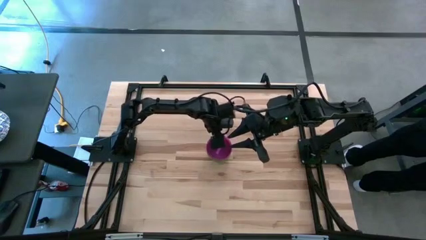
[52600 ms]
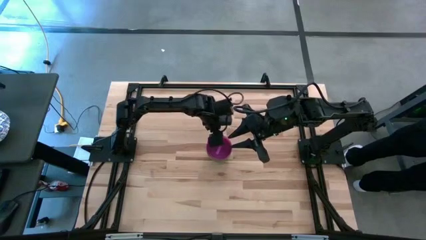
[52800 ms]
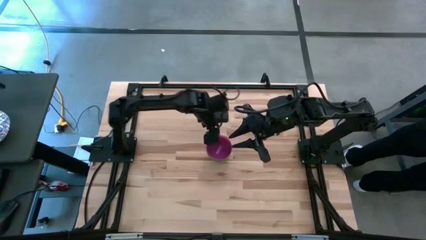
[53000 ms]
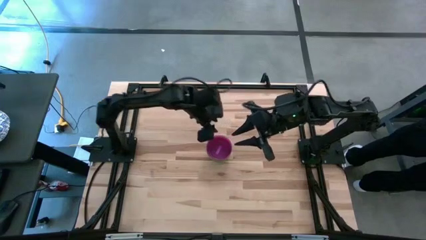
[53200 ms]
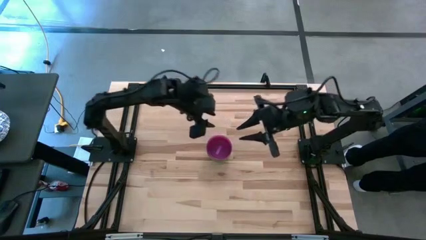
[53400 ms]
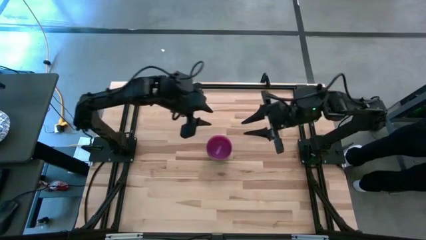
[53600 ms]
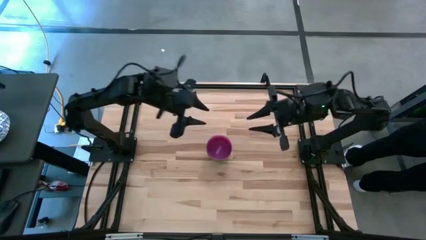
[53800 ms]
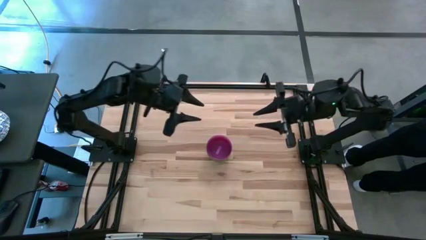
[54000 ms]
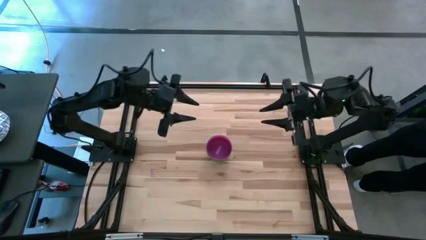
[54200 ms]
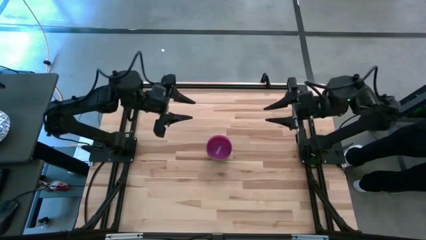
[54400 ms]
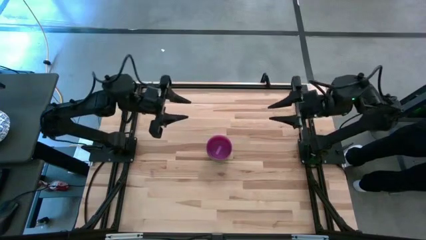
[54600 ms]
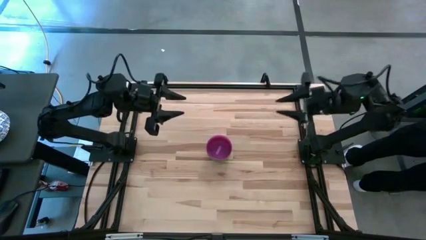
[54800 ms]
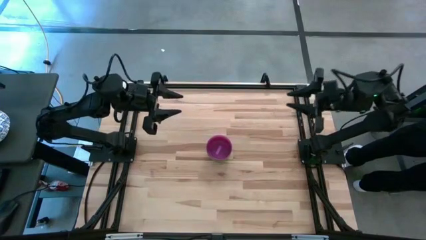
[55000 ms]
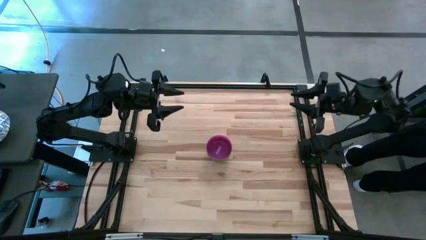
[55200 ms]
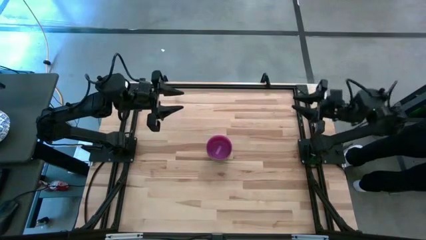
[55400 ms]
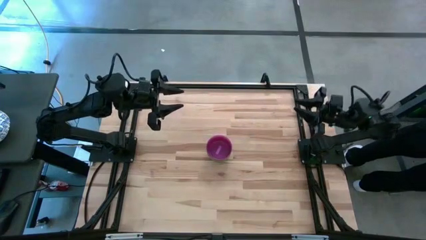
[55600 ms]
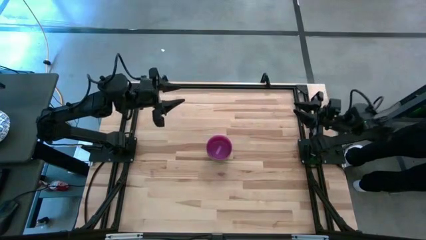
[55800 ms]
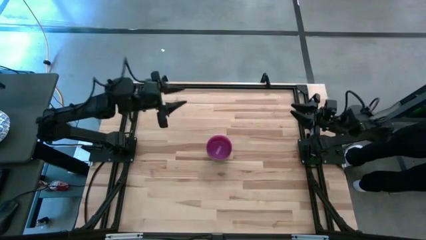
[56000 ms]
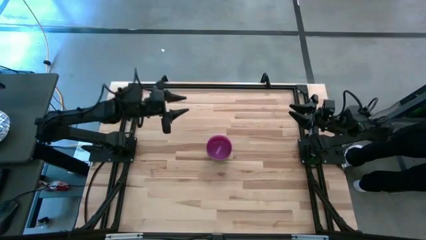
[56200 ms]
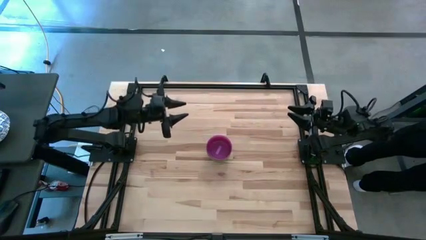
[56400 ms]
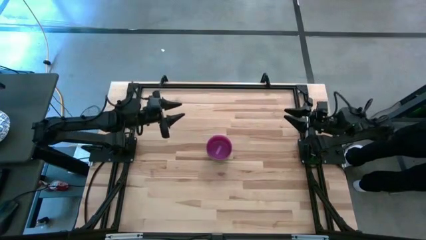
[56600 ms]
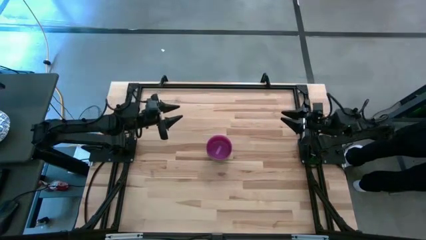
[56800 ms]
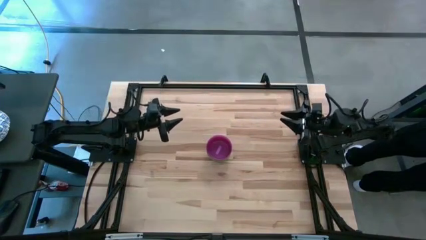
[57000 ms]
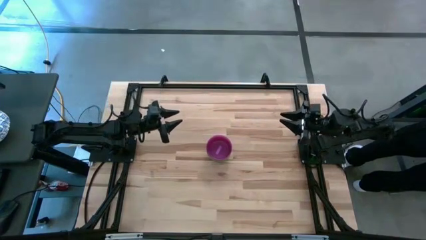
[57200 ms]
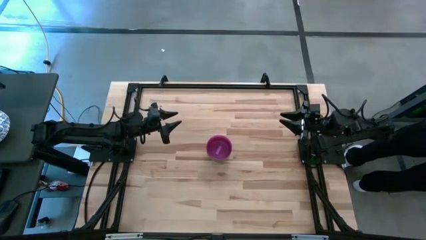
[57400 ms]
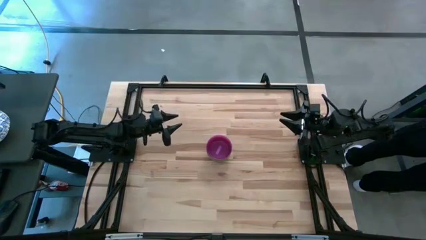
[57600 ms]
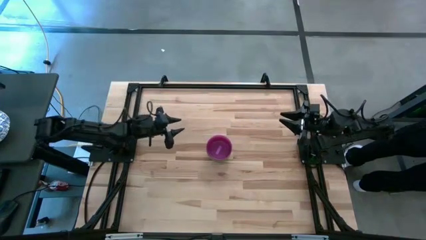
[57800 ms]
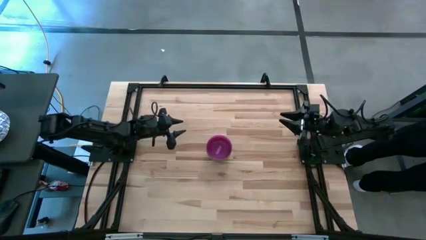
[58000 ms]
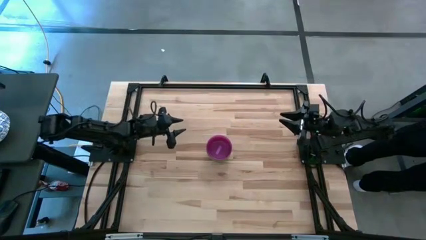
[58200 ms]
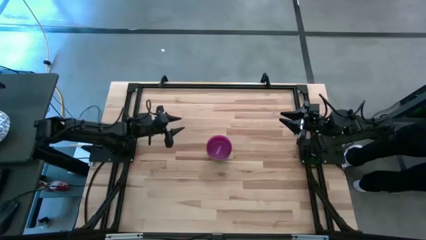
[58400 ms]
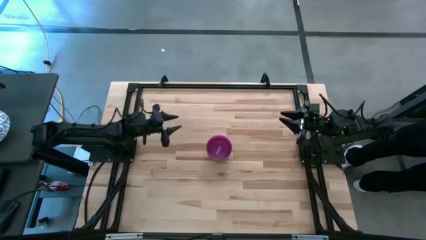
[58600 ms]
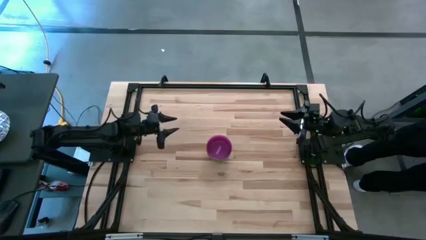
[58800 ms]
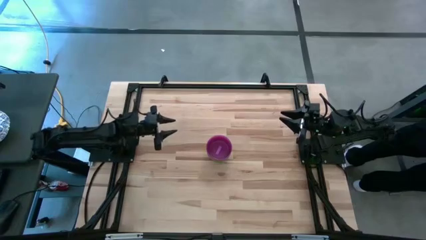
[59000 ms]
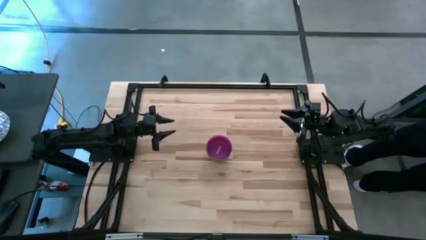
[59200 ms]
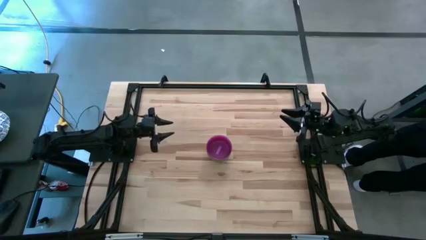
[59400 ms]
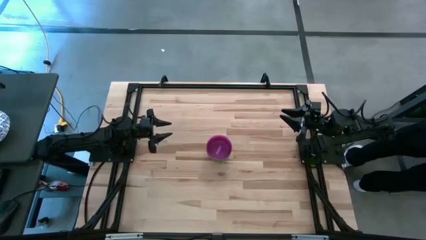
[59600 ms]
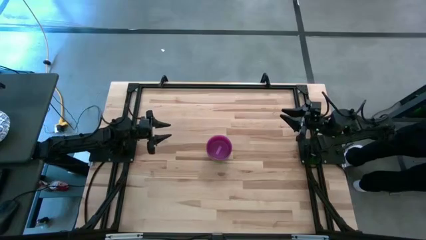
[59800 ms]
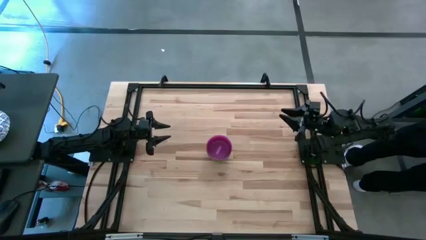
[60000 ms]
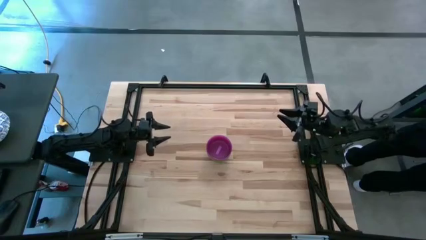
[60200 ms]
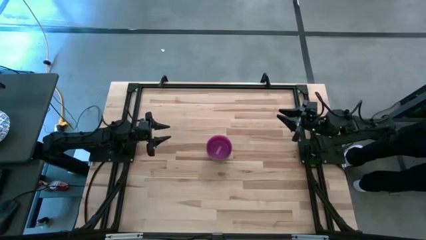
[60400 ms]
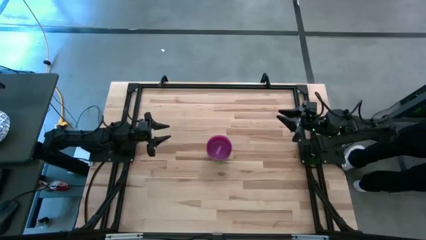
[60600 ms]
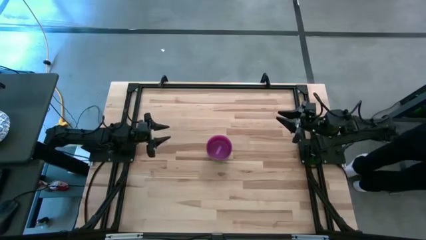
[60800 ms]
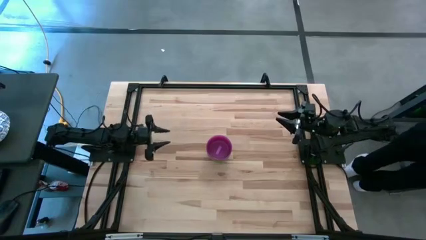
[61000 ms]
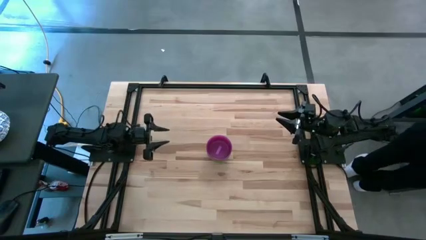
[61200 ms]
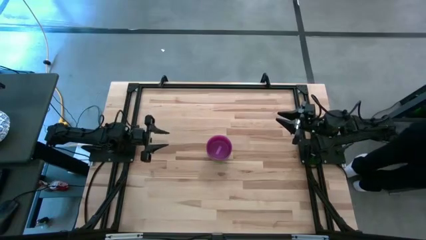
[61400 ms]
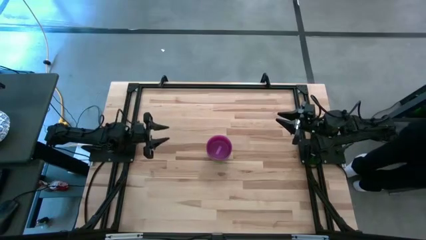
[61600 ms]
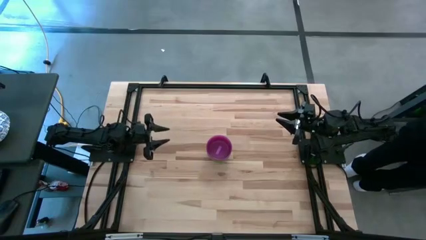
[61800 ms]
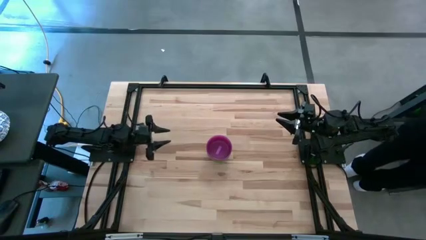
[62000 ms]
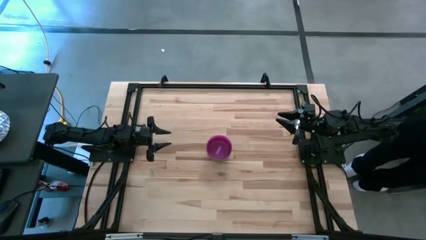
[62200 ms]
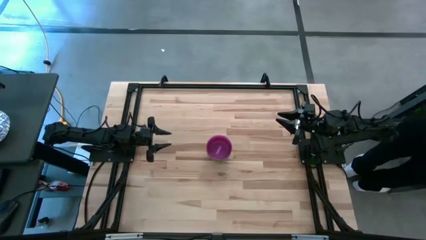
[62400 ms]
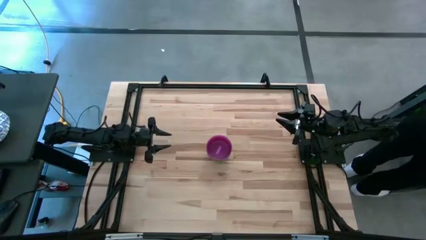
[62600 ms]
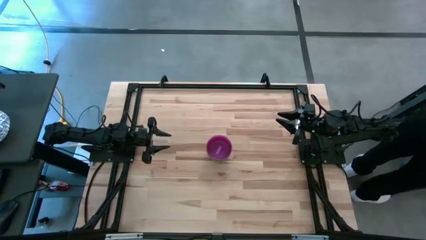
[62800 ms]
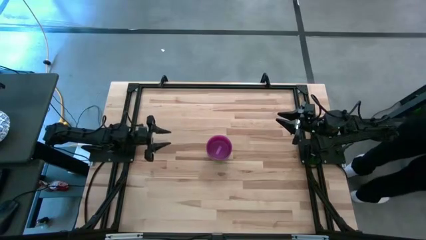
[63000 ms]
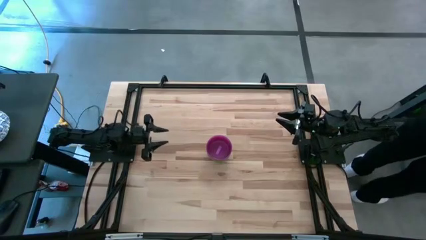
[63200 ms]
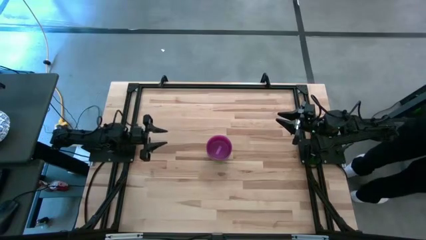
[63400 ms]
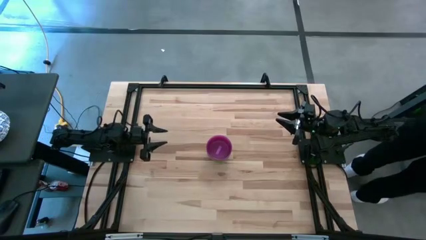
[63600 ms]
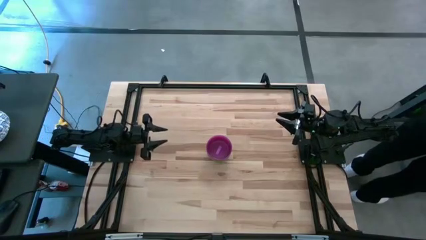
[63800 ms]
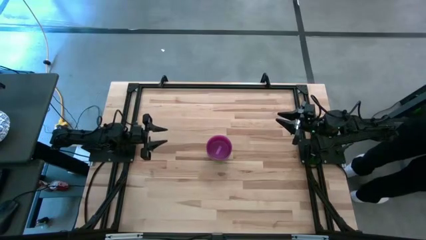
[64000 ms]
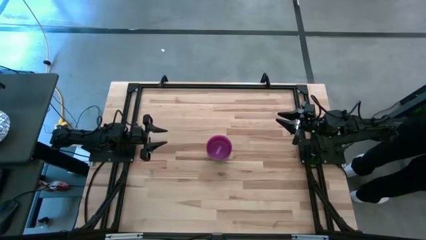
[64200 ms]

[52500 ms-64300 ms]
Task: Nest bowls inside each other
Return to Home Position

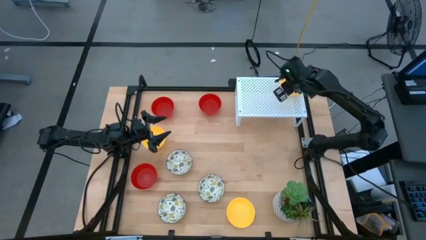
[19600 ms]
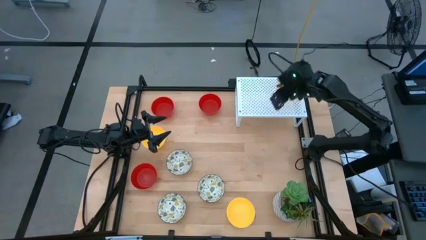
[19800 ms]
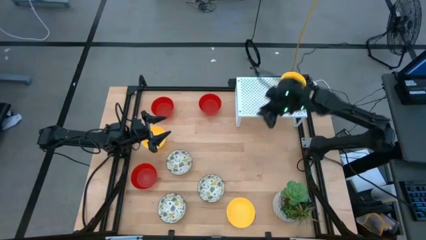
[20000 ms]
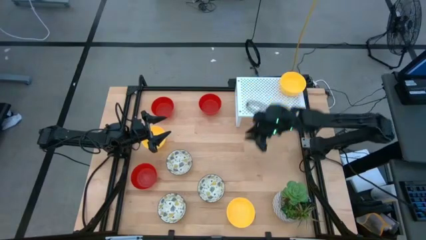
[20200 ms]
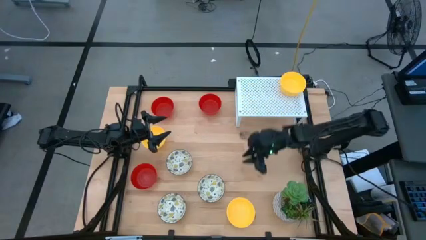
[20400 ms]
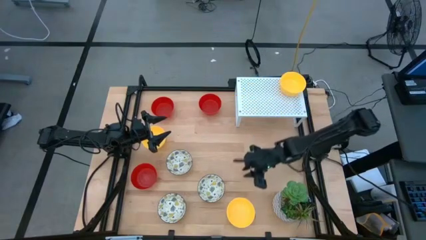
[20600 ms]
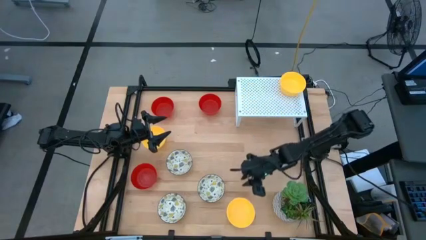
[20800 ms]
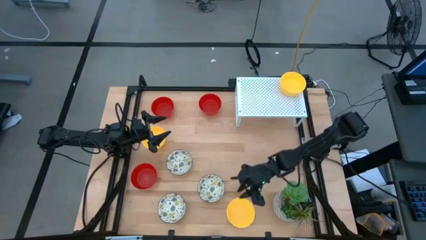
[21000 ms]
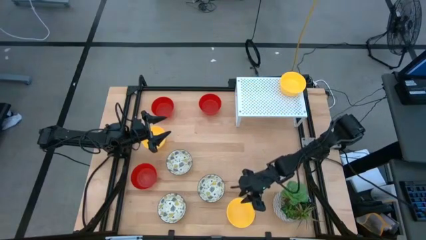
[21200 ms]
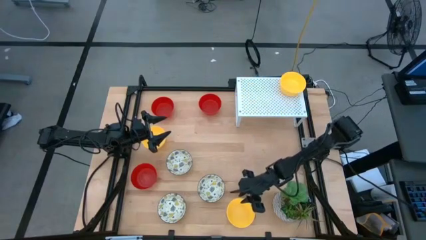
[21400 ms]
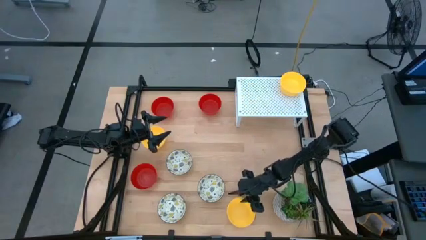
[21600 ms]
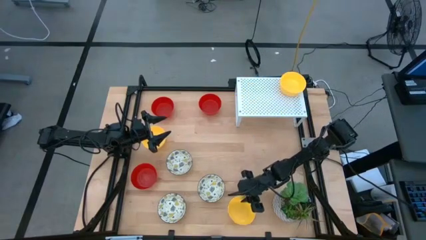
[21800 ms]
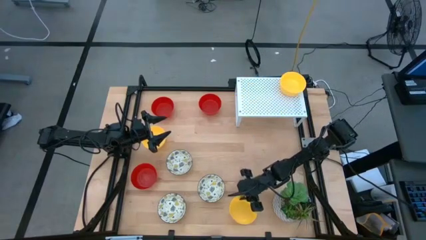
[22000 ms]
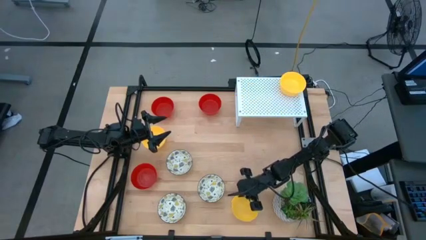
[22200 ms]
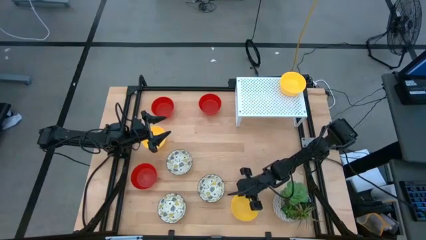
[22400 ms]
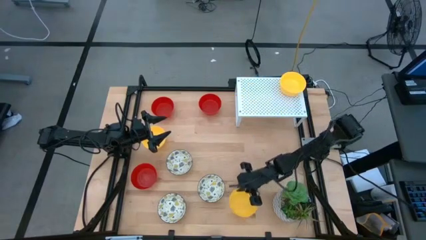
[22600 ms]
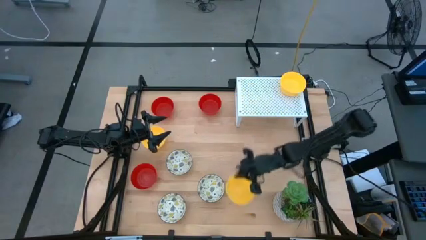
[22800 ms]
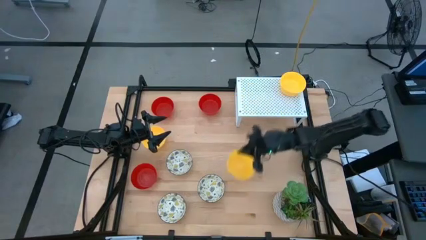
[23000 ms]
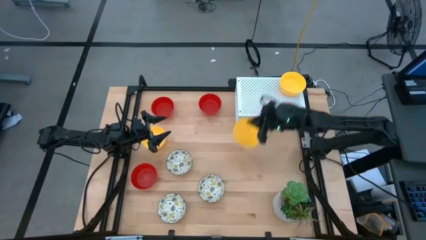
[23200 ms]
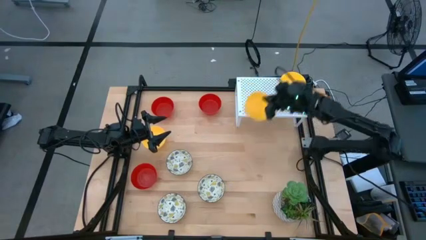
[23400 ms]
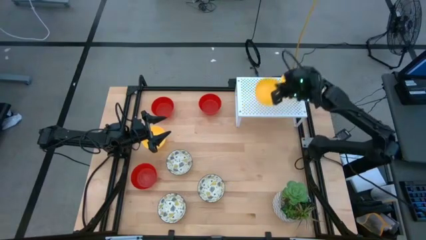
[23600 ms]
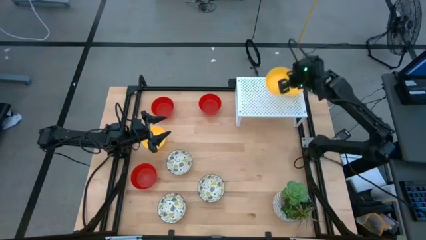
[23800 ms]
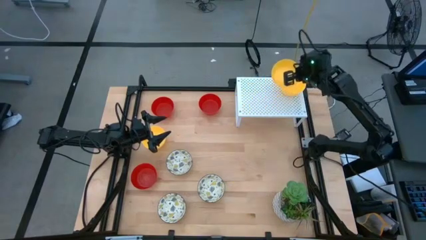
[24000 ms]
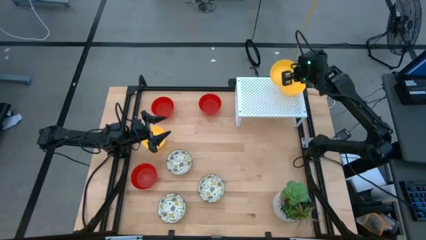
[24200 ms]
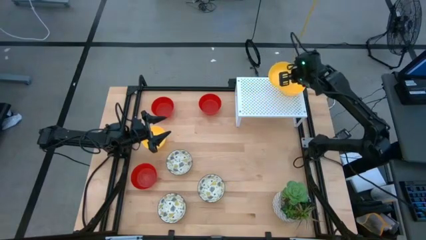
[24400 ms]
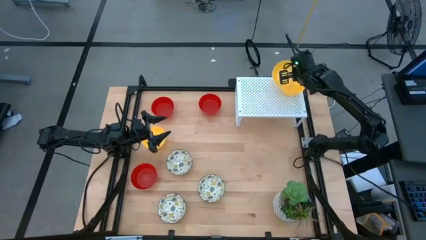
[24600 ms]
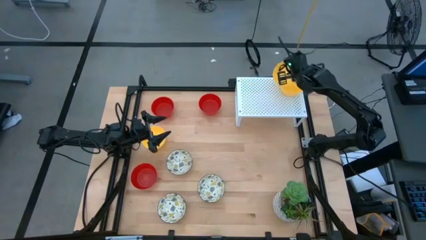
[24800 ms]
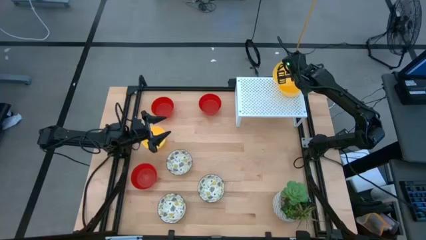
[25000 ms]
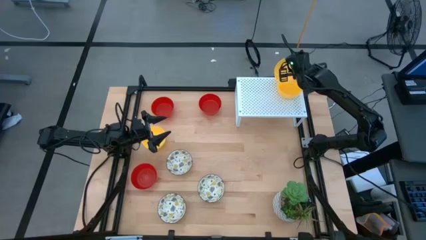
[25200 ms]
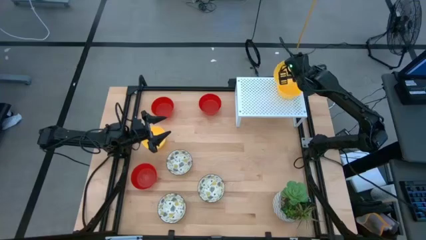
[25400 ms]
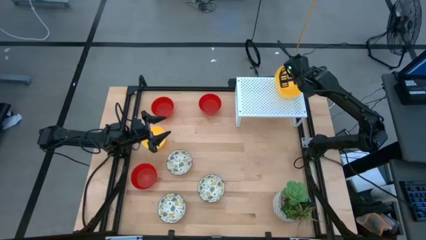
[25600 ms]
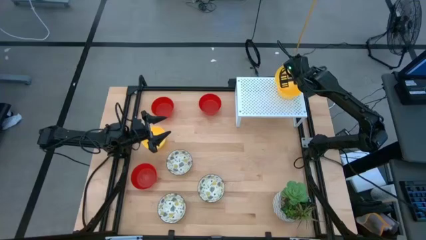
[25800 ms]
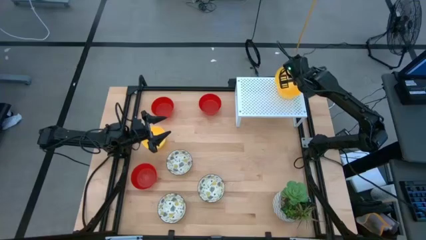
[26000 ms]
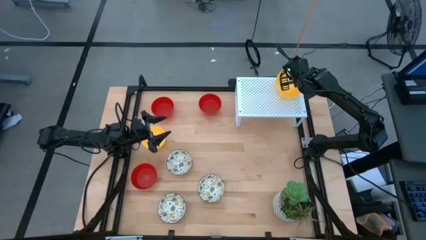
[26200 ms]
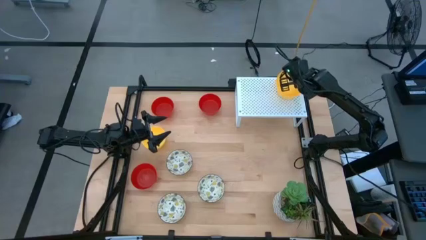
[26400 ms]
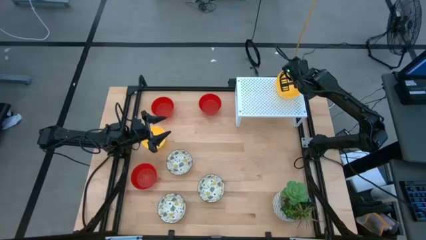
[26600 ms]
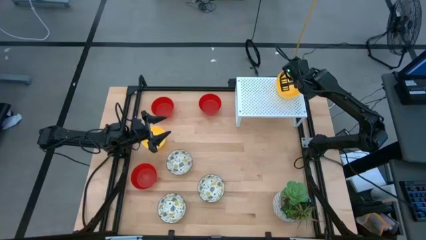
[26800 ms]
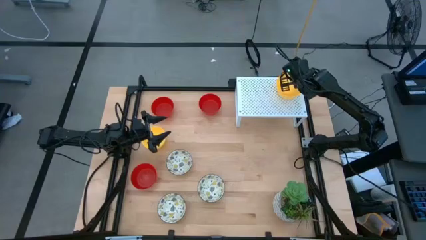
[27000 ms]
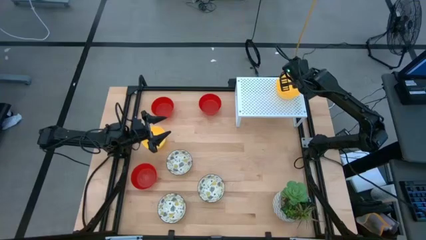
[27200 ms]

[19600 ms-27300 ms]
Task: Pick & Place Mini bowls
Stack the yellow bowl on top of the yellow bowl on the shelf
